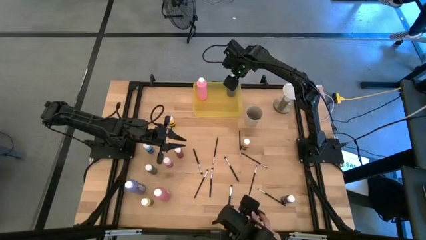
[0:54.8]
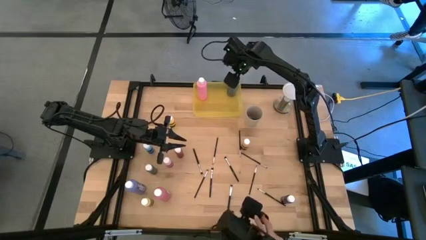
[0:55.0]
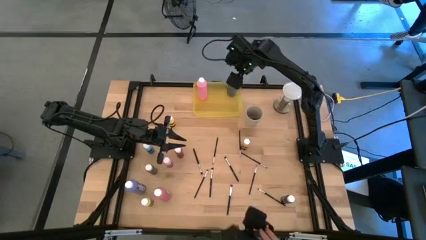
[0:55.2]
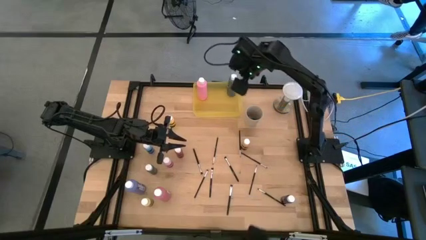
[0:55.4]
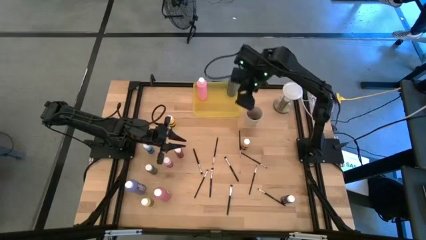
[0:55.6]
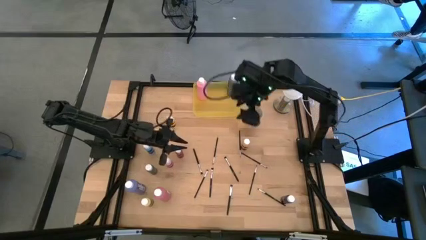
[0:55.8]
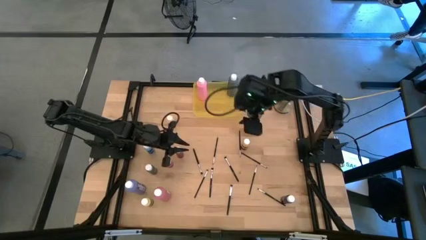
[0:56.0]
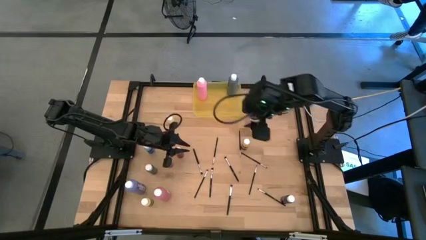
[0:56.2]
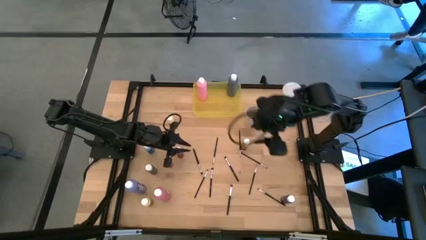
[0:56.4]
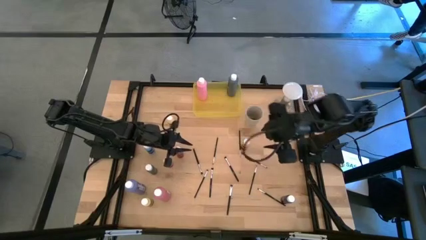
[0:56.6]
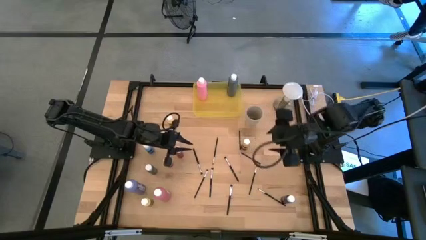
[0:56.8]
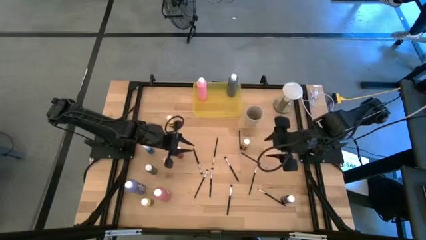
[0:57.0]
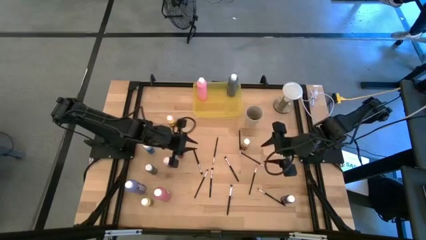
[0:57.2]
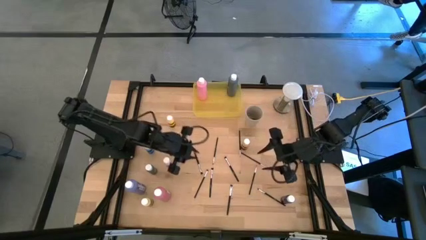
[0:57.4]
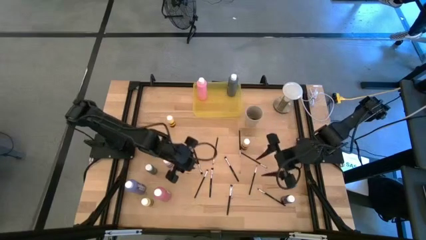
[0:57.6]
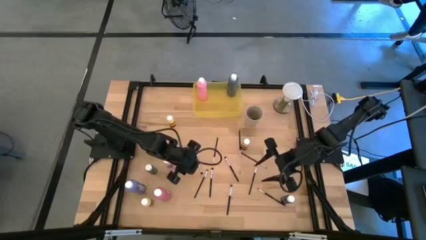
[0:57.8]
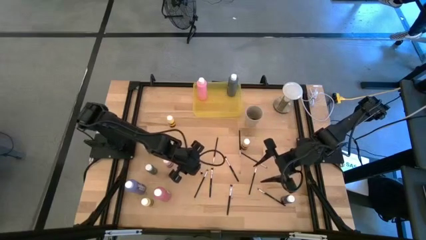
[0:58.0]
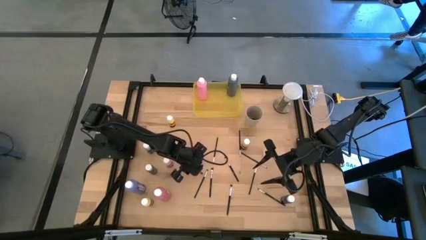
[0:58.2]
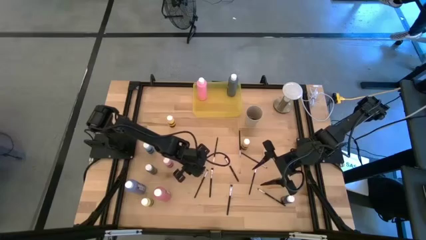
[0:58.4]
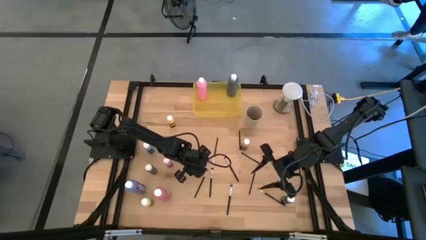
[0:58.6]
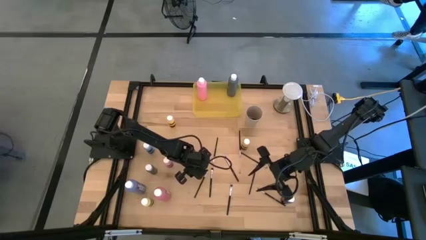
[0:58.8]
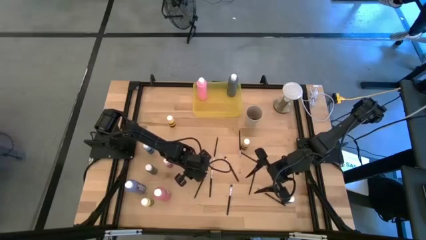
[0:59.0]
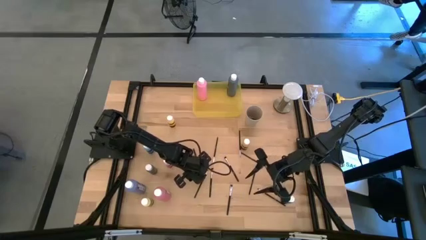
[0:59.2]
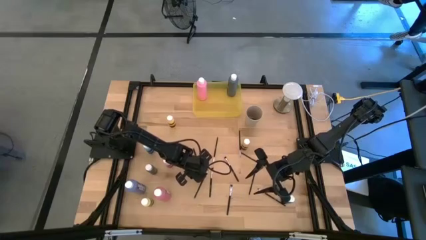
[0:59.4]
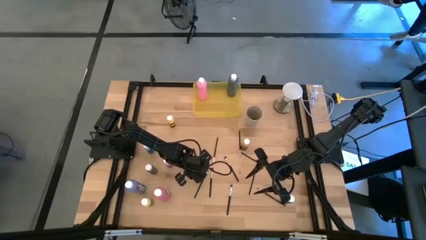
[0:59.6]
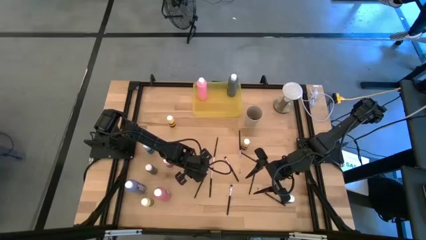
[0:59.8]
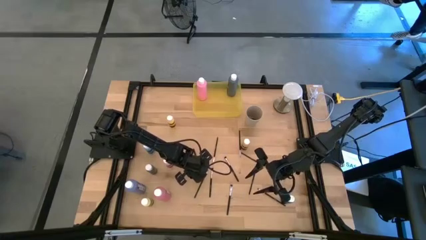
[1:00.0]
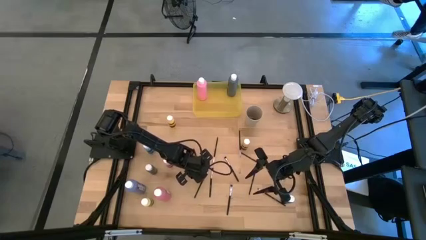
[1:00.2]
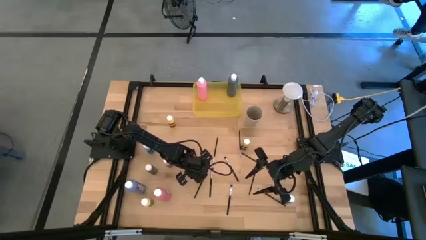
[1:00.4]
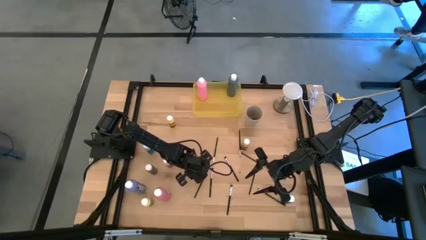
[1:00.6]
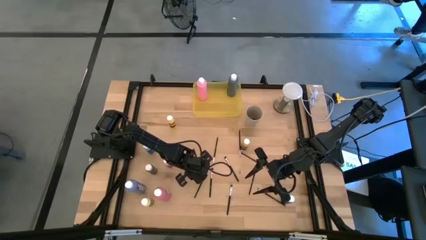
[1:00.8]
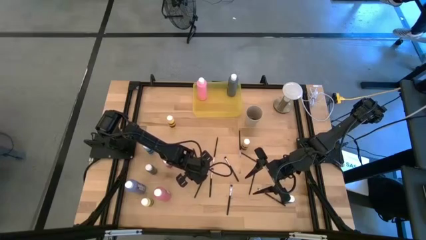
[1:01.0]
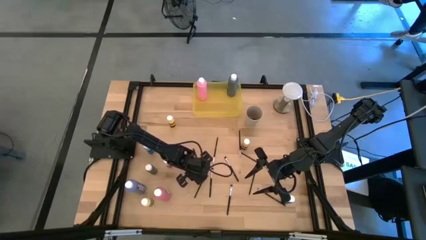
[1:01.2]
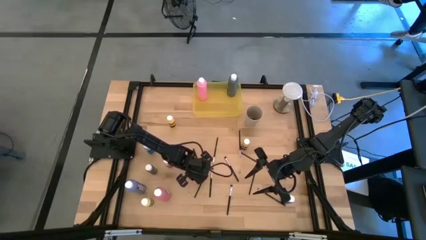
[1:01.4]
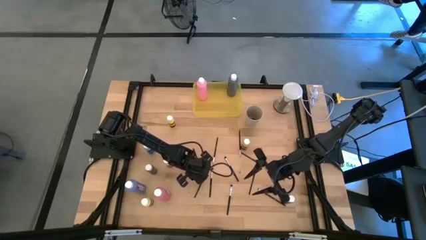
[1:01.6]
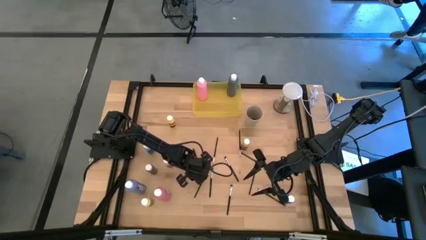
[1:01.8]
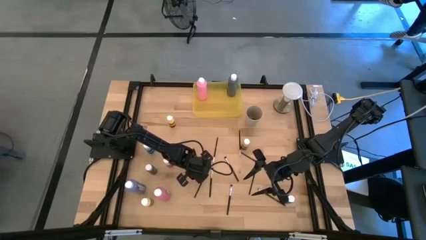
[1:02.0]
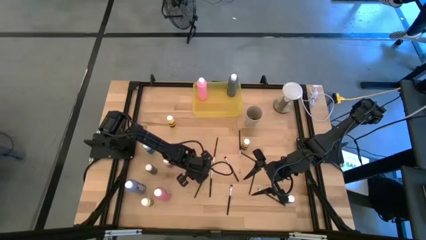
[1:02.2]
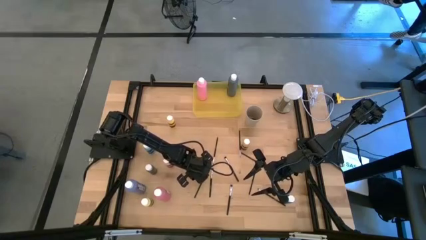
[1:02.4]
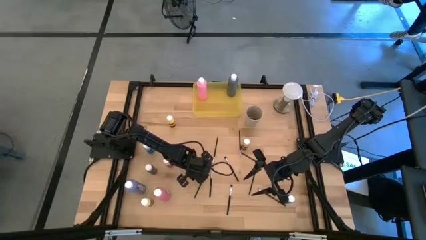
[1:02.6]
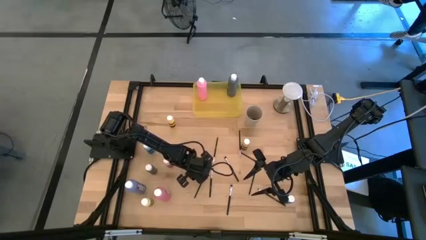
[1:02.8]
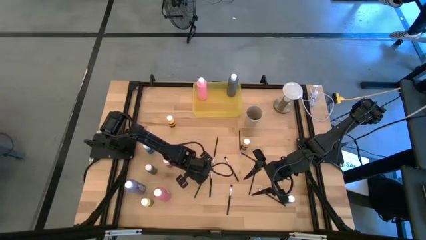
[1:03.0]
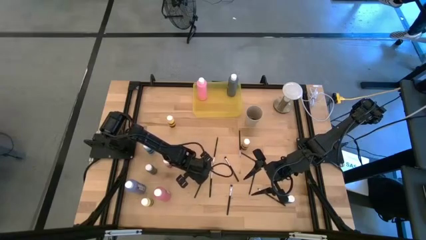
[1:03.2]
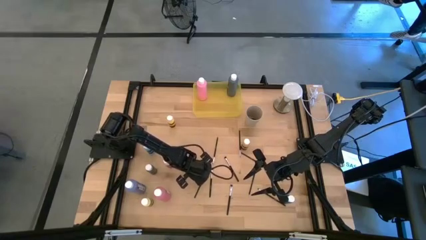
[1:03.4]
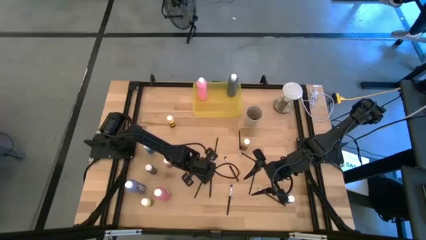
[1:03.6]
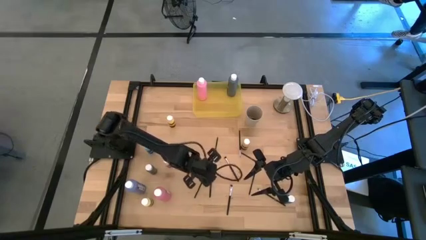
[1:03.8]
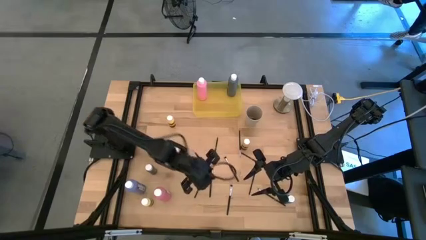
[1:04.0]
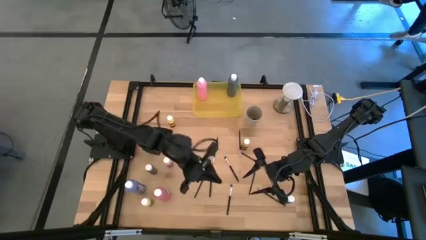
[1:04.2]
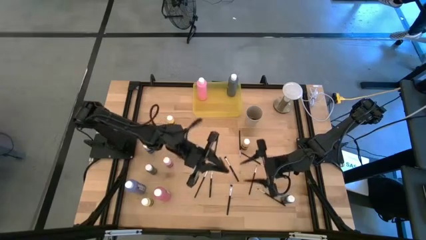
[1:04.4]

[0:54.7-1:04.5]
Task: Pick & Place Paint Supplies
Put the silver paint brush into the white cup

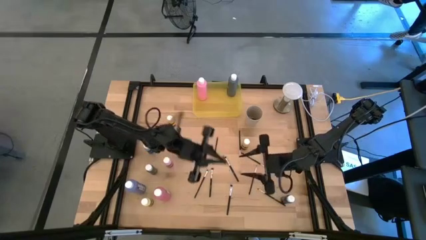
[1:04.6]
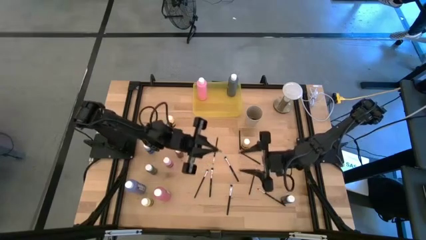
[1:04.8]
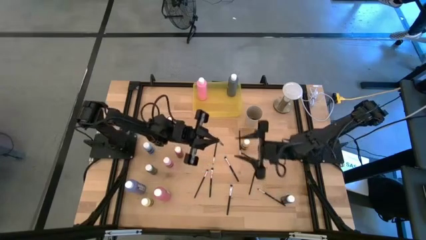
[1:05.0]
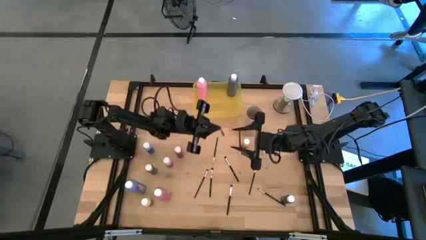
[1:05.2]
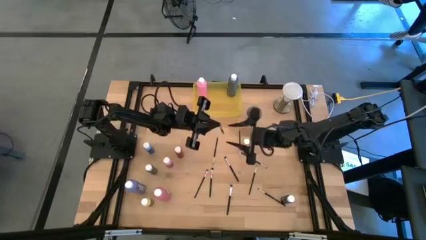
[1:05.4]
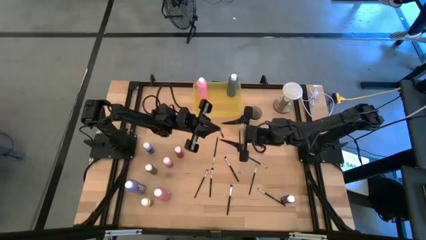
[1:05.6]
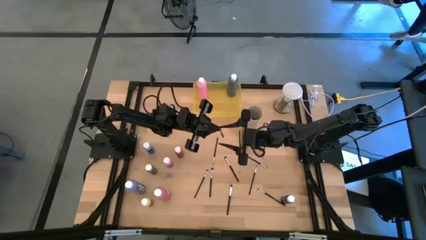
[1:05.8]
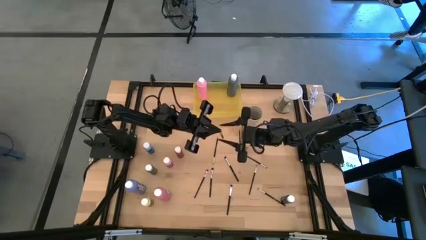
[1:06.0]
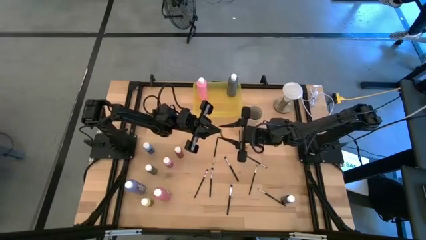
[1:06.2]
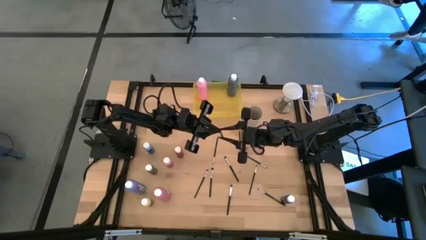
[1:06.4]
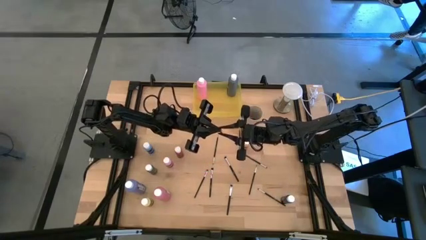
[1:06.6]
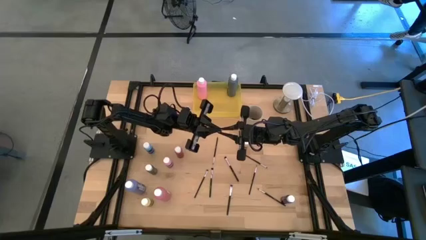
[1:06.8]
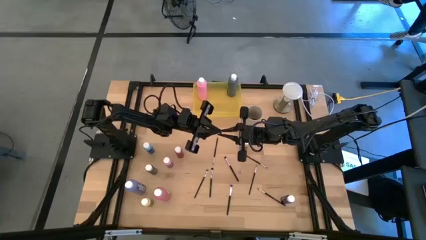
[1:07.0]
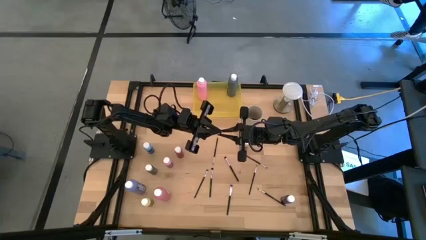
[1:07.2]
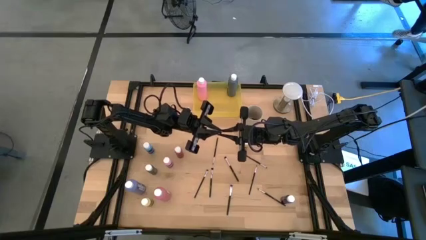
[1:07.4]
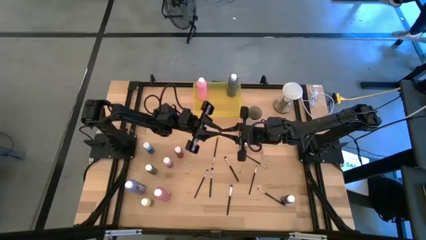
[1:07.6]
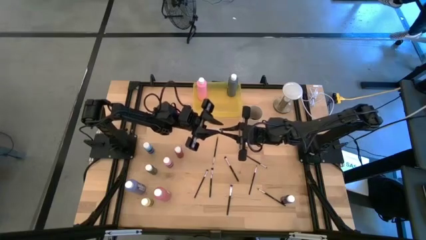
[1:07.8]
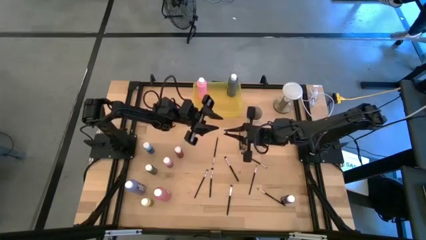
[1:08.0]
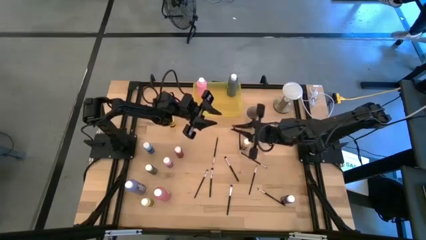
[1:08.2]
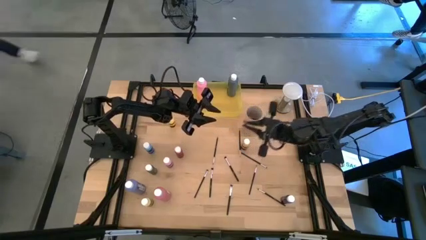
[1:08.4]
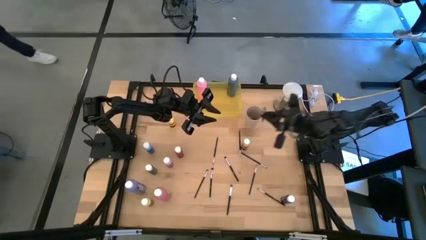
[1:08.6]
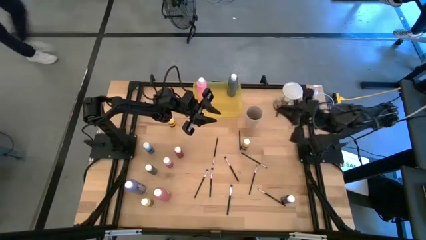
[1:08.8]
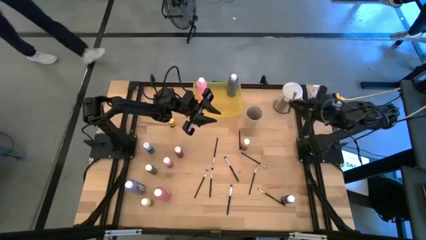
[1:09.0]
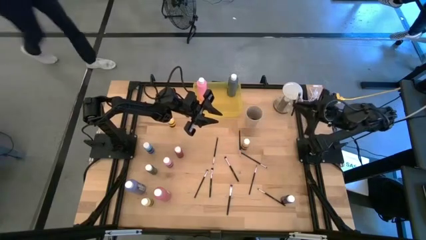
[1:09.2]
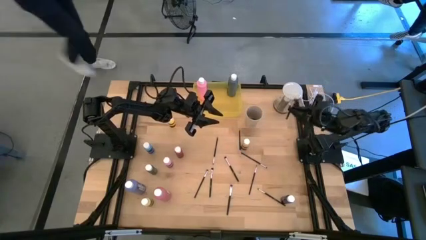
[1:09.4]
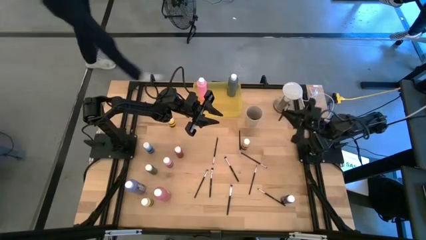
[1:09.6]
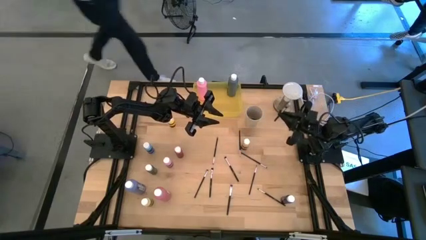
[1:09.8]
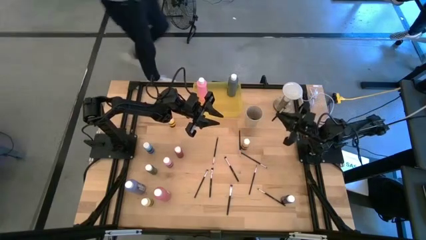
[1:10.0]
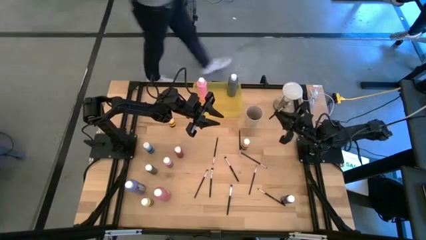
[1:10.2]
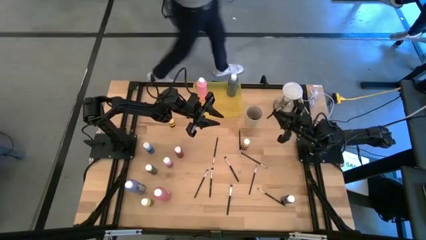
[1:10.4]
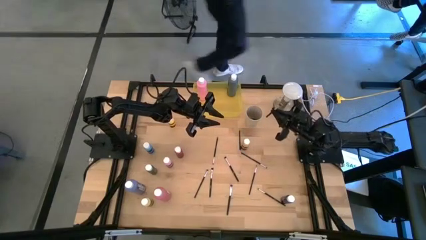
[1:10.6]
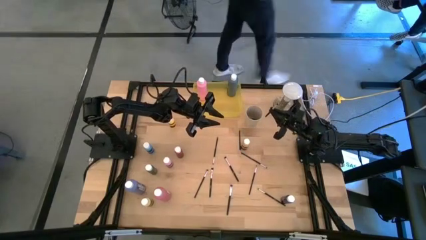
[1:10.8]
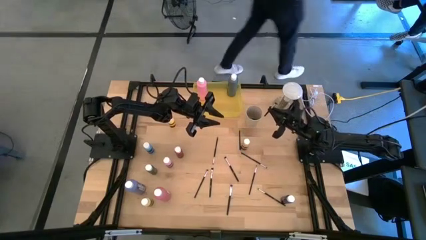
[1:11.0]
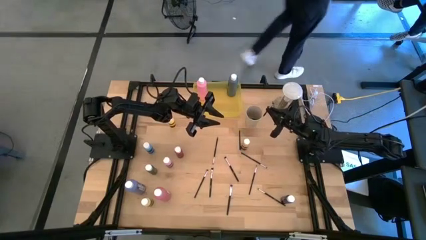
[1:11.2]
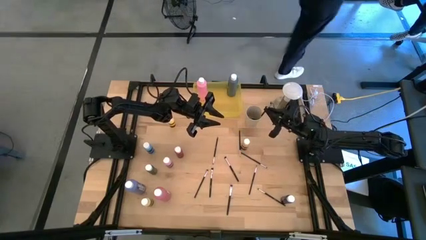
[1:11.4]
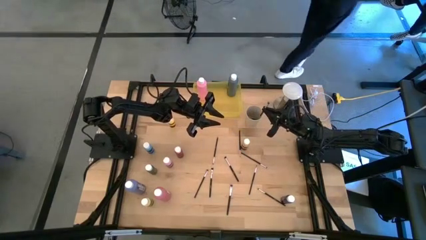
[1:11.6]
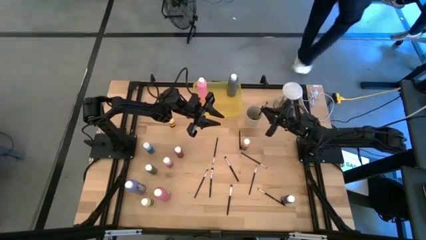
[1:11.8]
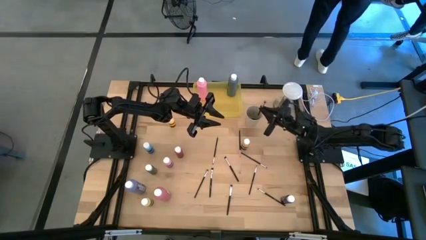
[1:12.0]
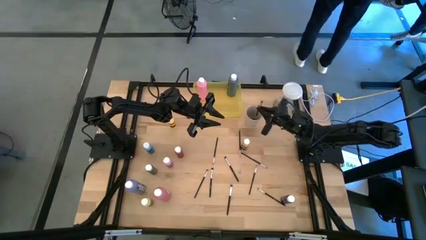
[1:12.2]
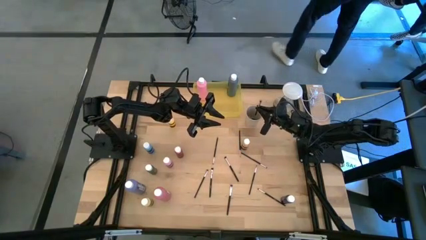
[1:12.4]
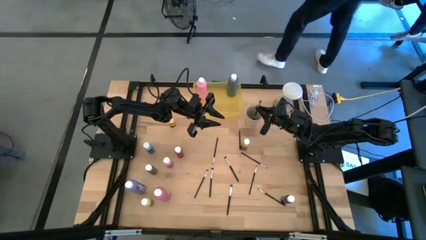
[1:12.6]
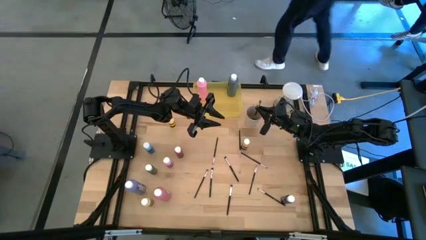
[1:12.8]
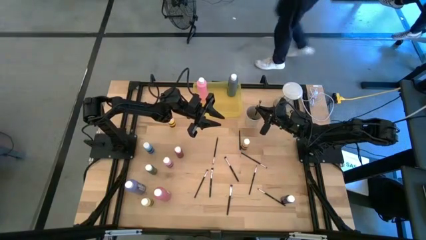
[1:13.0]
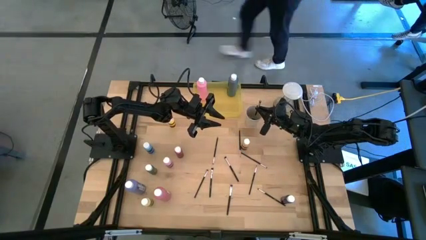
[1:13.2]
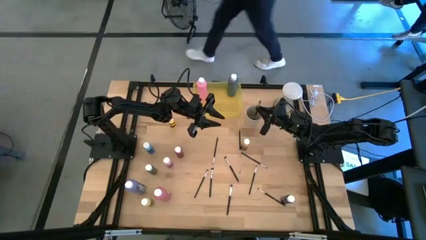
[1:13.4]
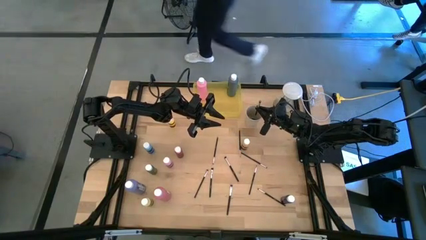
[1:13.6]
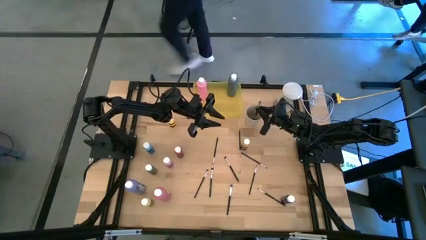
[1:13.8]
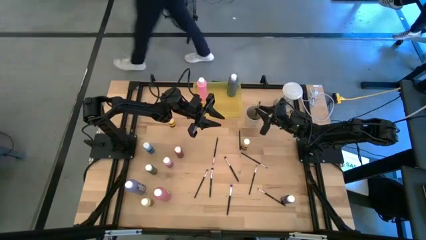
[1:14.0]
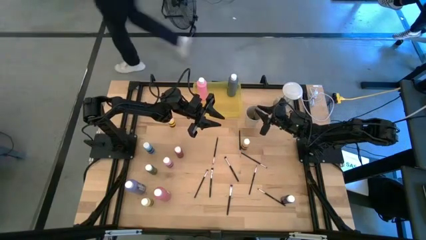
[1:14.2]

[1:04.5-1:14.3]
Put the silver paint brush into the white cup
